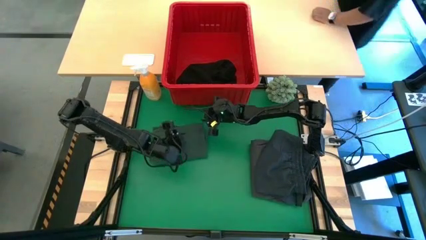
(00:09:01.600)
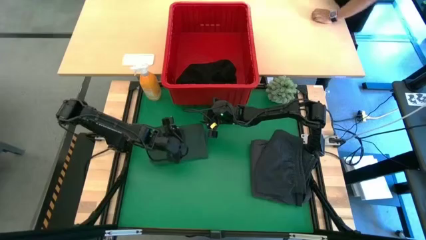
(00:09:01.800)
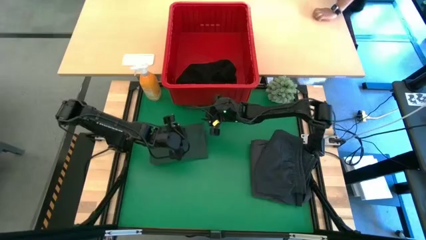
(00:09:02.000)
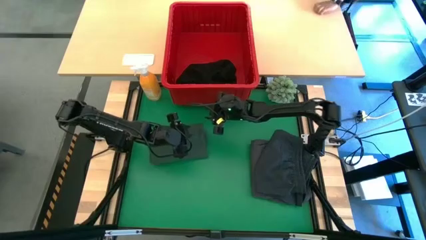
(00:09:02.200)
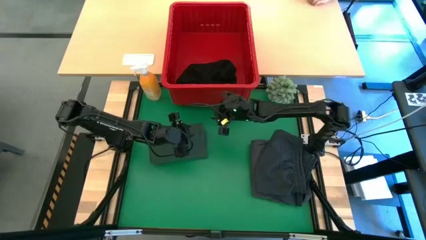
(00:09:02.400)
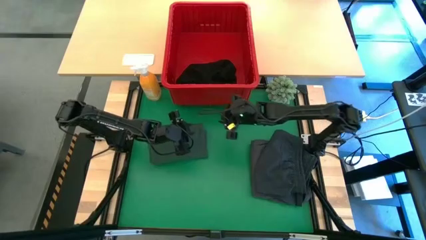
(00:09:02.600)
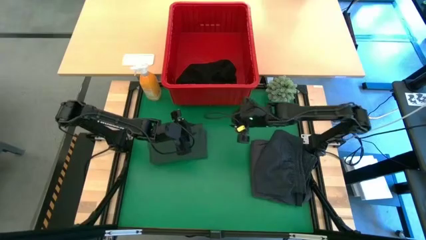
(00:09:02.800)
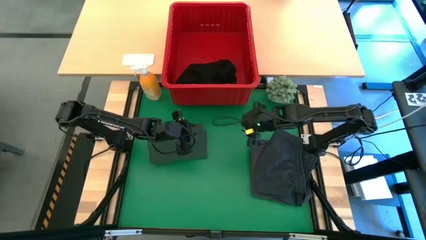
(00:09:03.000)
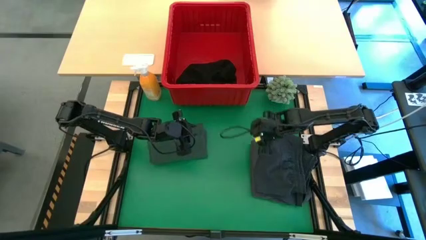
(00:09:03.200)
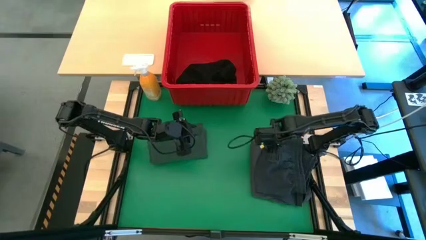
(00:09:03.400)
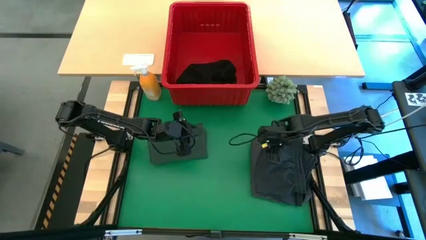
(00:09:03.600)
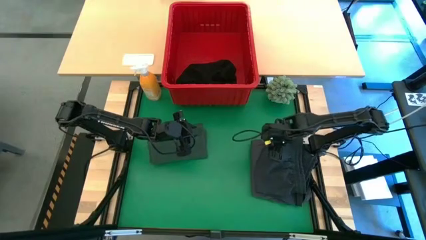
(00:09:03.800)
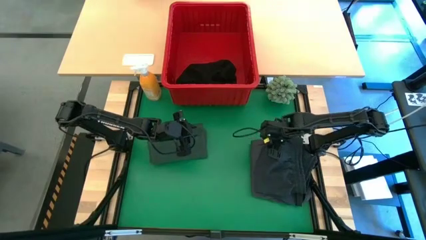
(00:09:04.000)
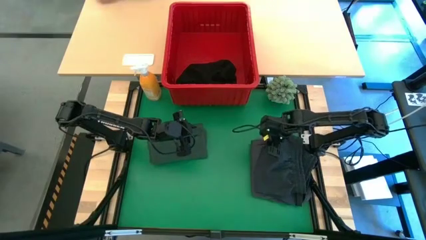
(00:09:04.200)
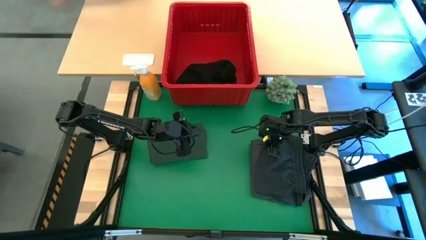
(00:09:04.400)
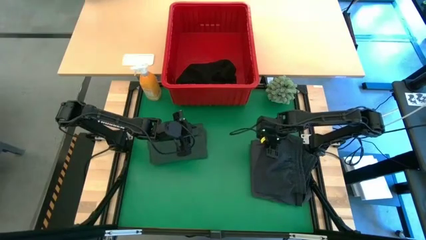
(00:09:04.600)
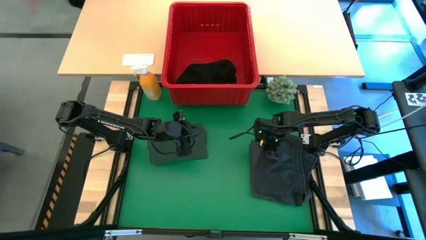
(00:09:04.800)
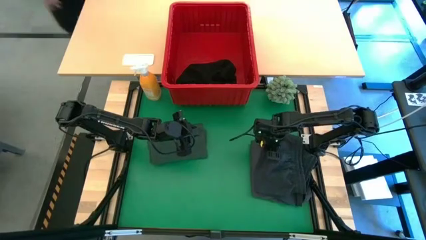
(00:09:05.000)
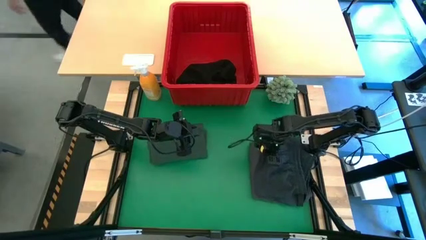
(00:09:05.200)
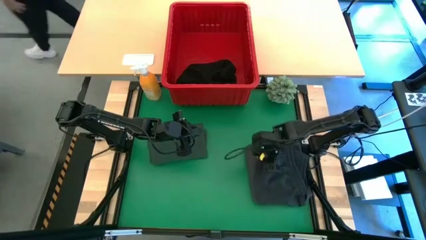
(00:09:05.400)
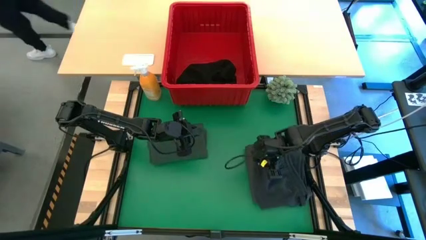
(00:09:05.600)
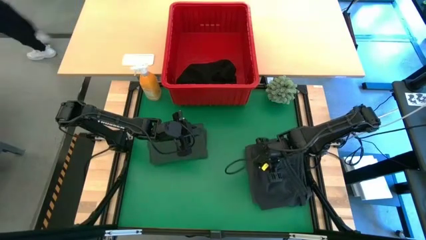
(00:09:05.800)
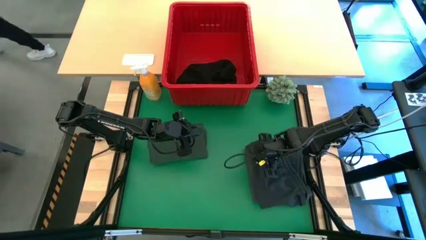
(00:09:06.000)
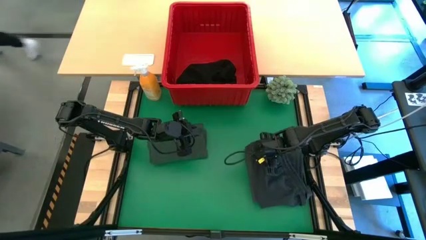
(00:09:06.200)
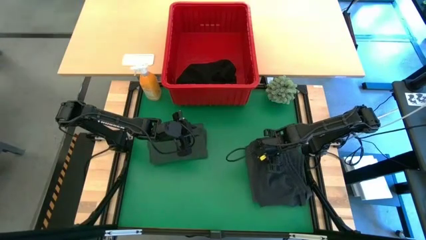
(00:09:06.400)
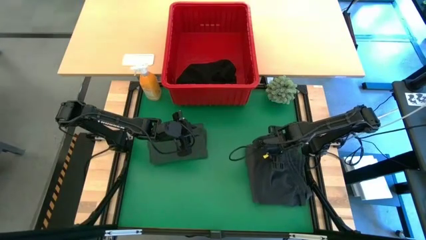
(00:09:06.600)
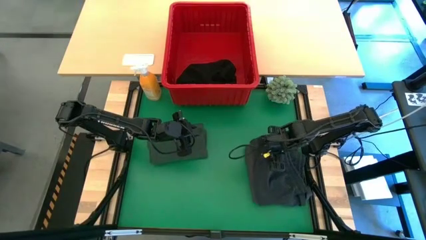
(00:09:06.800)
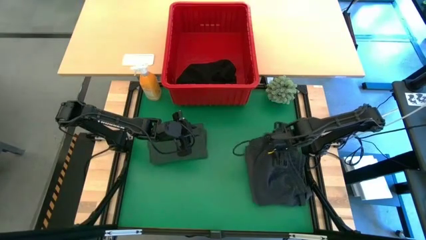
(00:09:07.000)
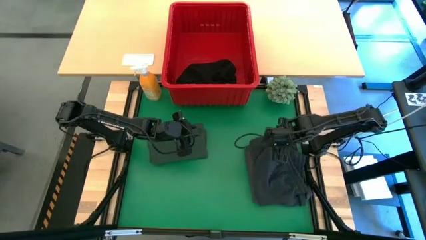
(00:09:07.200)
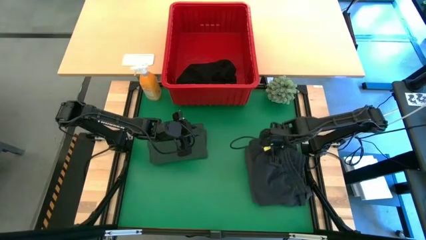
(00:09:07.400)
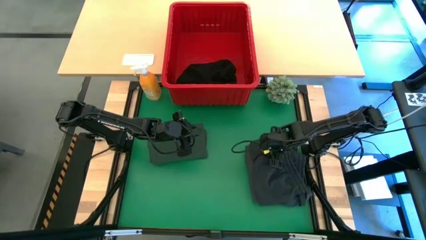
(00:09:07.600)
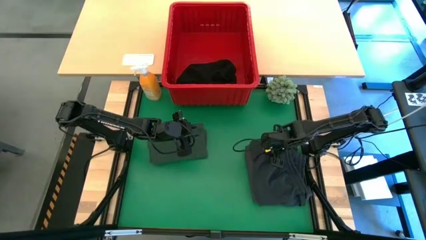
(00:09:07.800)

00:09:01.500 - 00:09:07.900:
Task: Fold Laundry from Bin
Adjust the stacked clothes

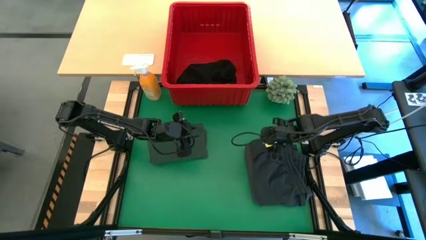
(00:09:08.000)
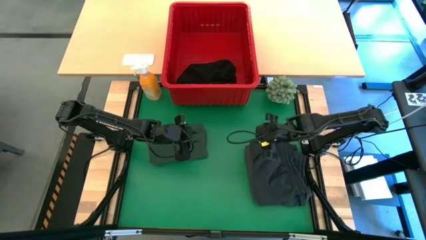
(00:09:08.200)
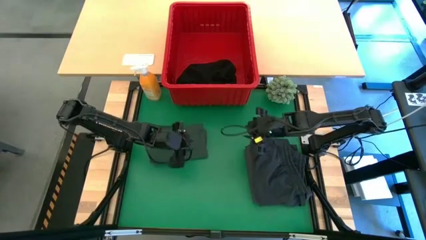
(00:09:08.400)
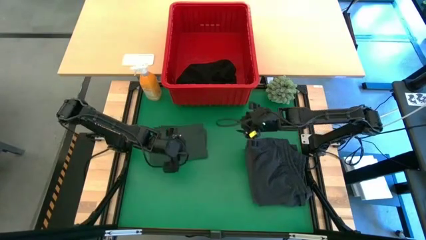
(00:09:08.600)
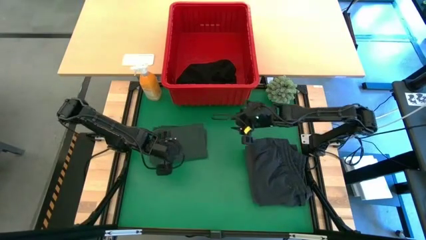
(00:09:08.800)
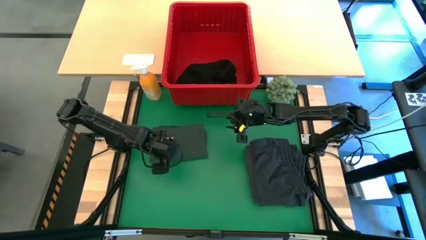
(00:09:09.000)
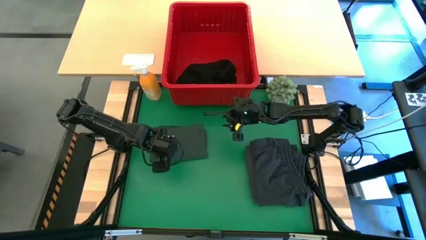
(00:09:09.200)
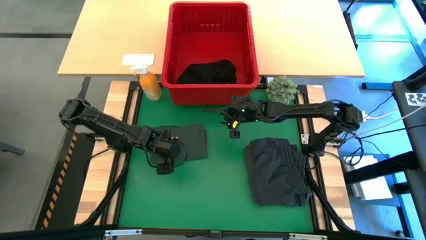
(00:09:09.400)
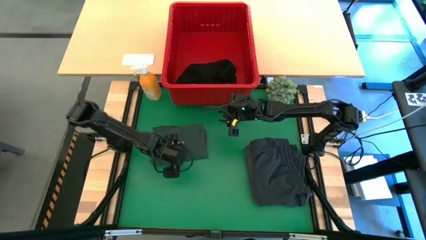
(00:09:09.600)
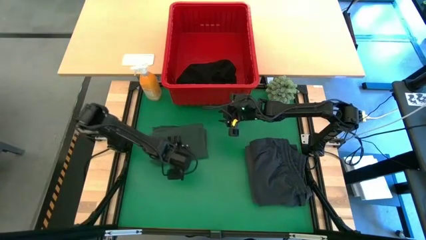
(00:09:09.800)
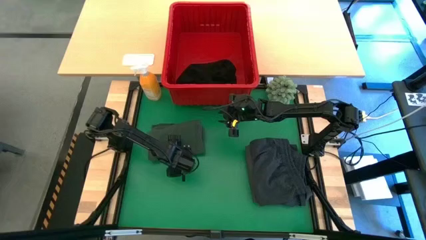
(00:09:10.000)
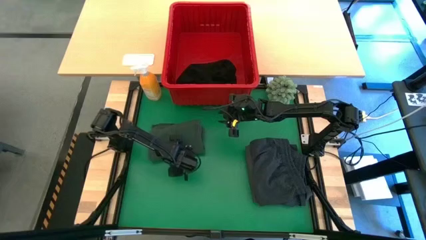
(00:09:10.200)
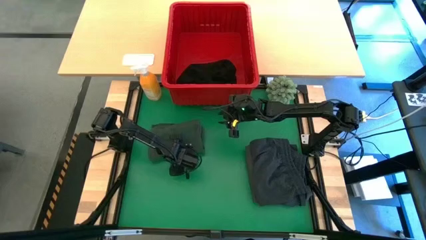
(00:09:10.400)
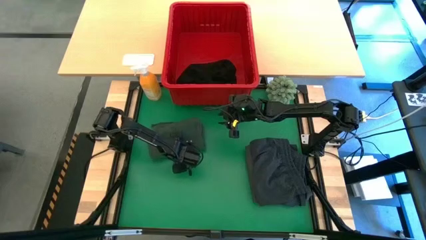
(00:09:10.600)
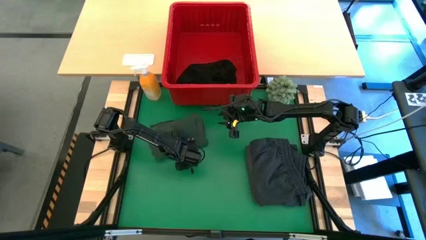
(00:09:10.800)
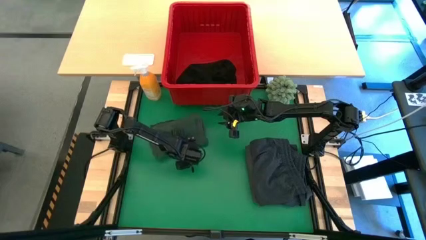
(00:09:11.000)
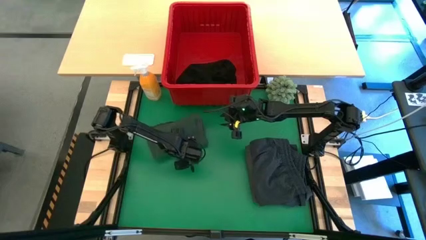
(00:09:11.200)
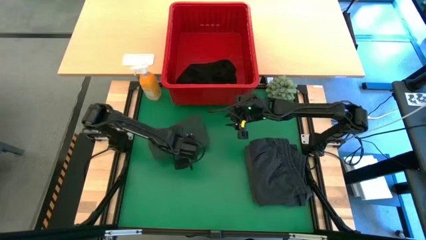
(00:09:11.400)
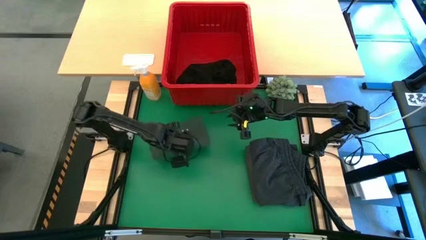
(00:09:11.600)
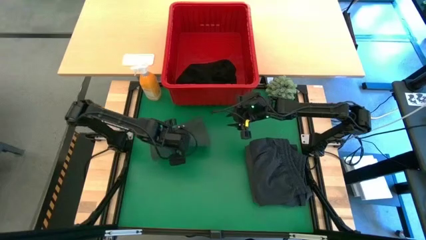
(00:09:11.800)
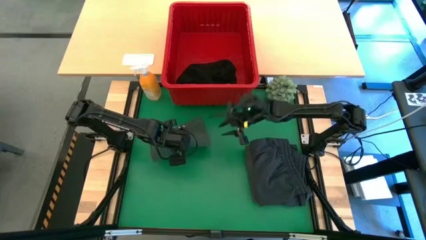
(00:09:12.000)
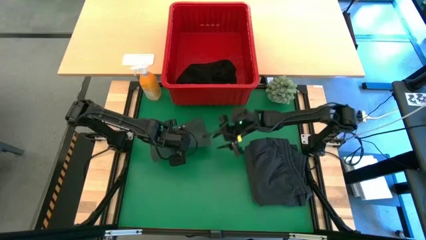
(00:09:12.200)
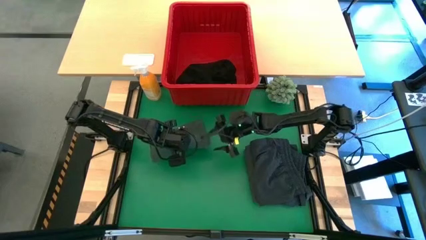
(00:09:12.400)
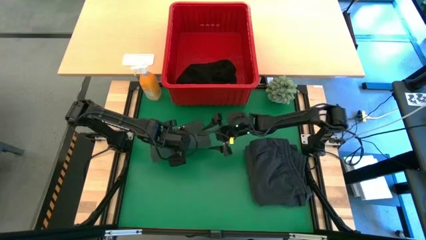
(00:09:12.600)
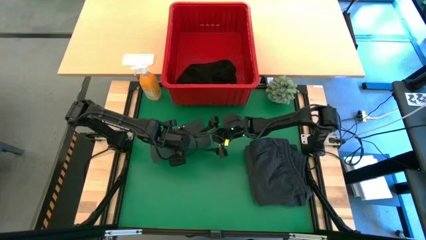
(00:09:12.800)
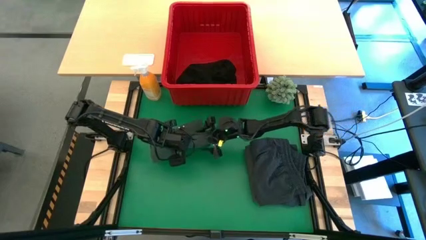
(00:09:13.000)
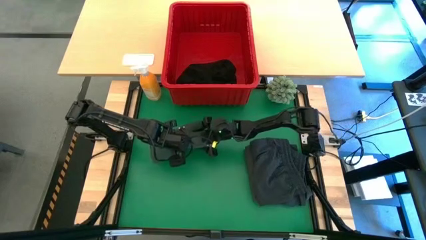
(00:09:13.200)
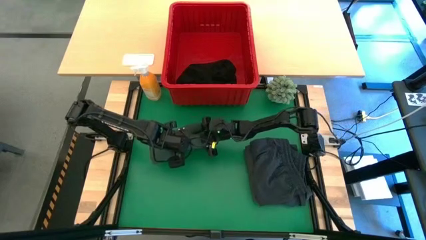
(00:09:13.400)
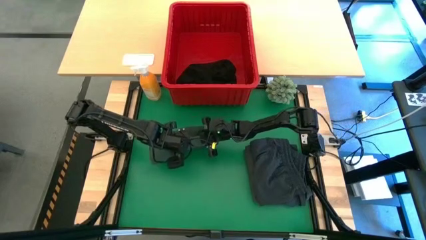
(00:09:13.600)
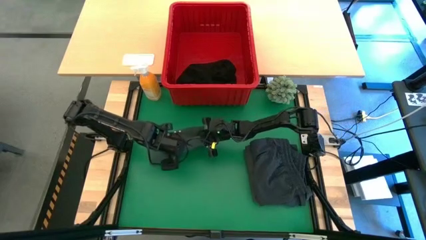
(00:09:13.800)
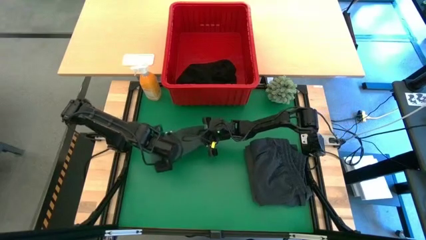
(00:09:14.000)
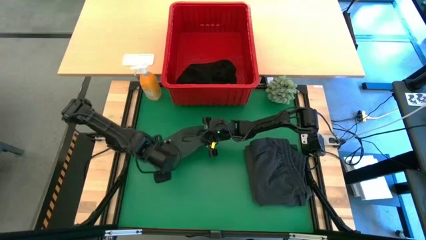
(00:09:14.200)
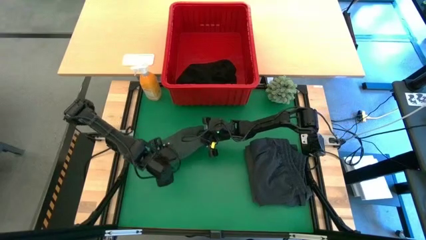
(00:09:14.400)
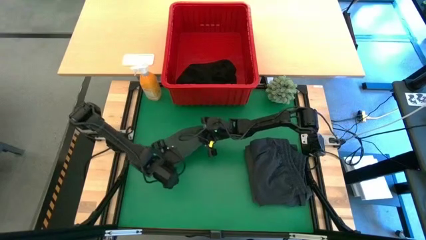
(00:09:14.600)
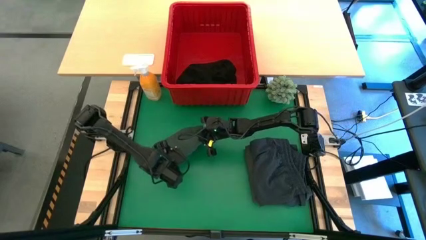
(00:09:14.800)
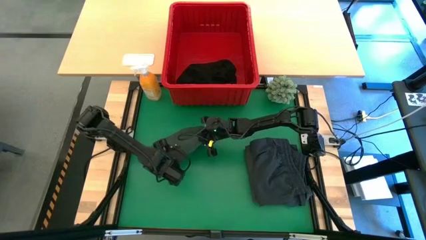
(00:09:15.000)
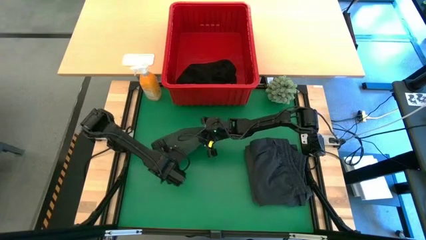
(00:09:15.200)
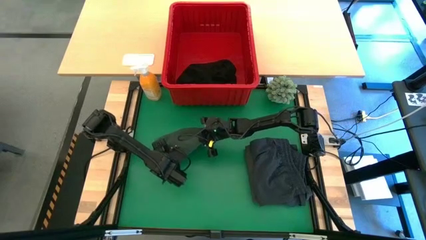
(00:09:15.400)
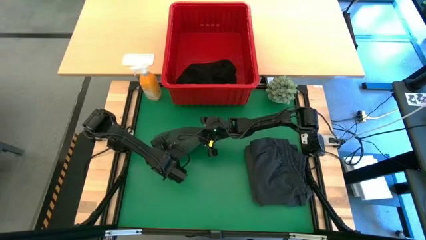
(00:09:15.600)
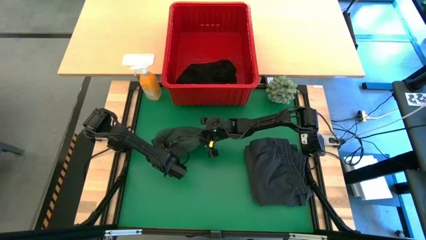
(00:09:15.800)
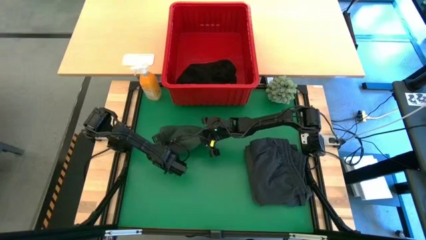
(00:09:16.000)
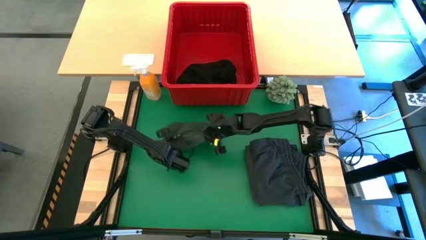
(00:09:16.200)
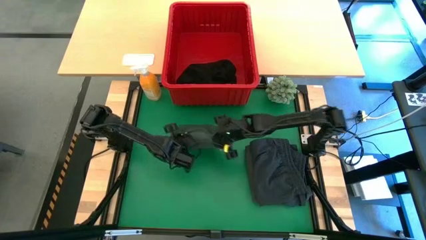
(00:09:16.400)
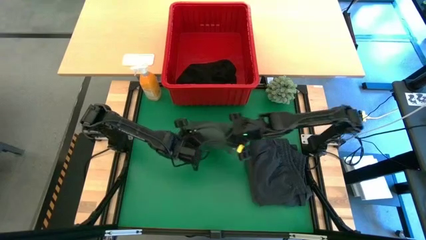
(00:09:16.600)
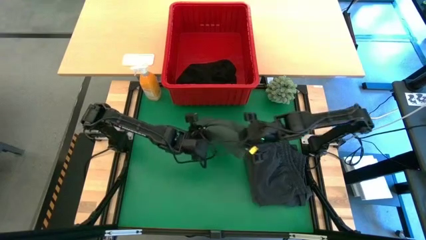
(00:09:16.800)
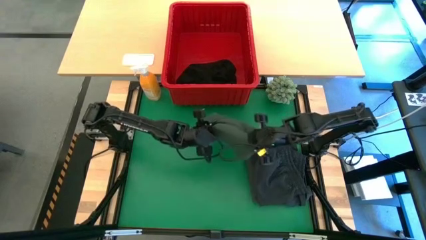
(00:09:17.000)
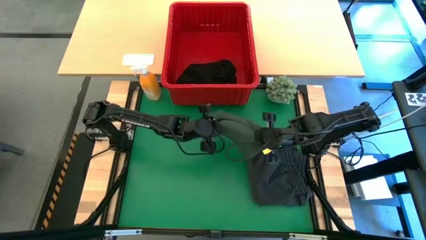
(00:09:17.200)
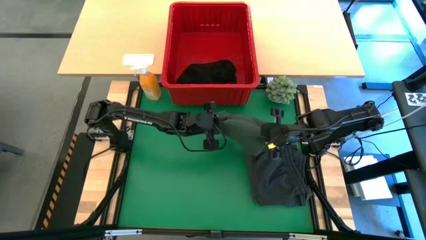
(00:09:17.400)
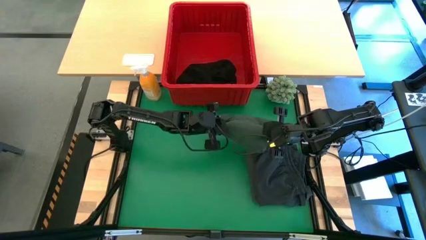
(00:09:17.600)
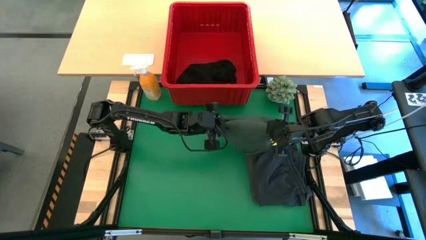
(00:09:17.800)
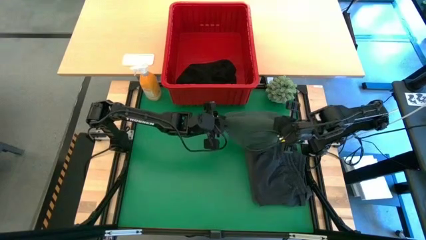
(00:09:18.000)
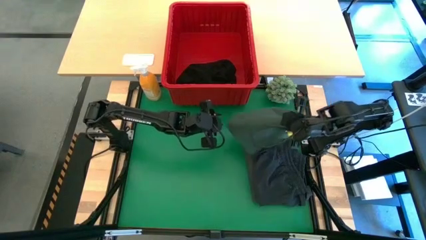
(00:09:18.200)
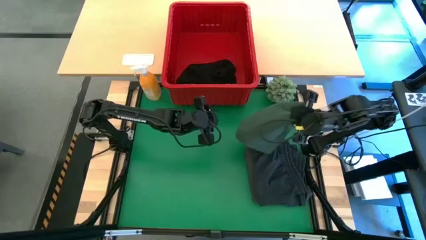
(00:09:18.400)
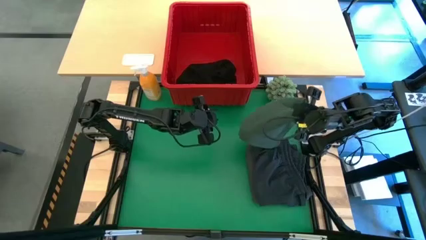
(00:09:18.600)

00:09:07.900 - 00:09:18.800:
Stack the green polo on top of the dark gray short
